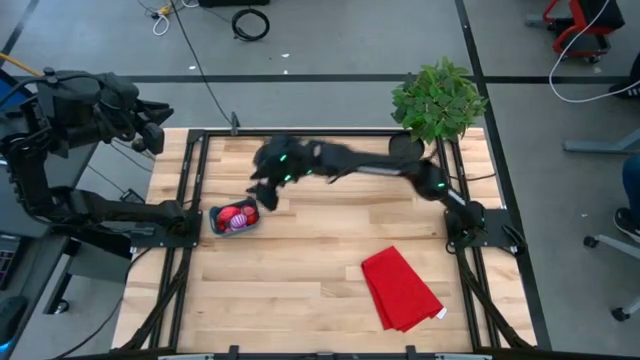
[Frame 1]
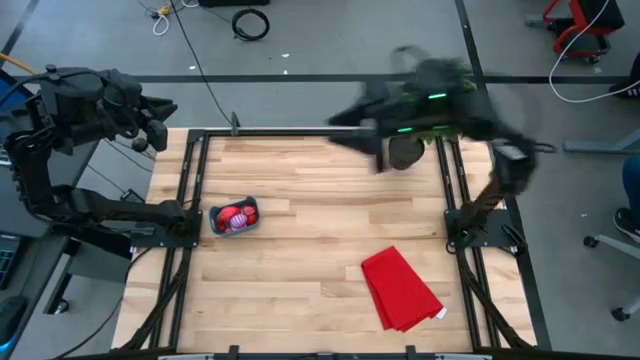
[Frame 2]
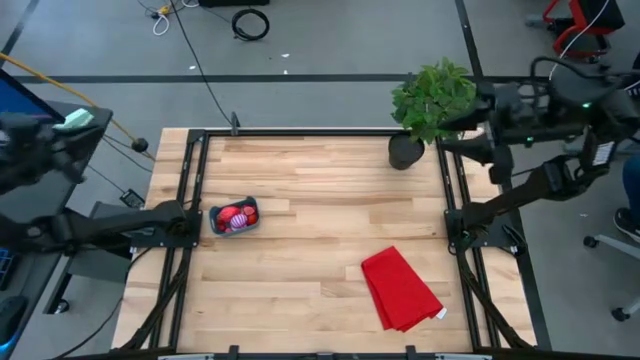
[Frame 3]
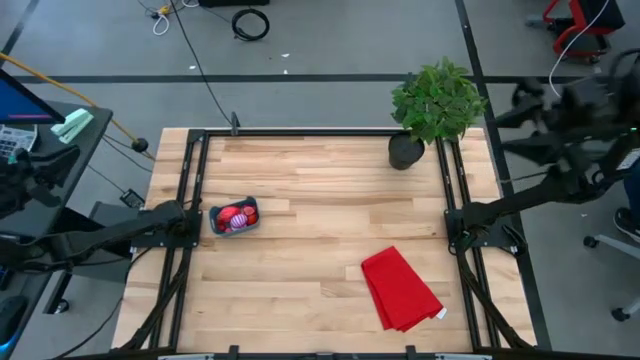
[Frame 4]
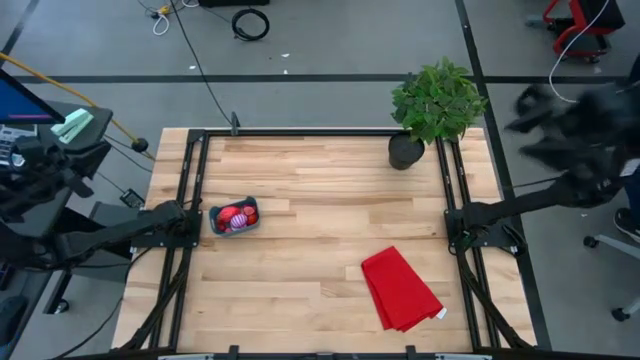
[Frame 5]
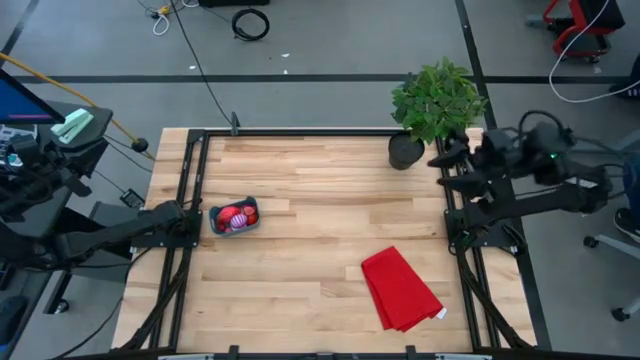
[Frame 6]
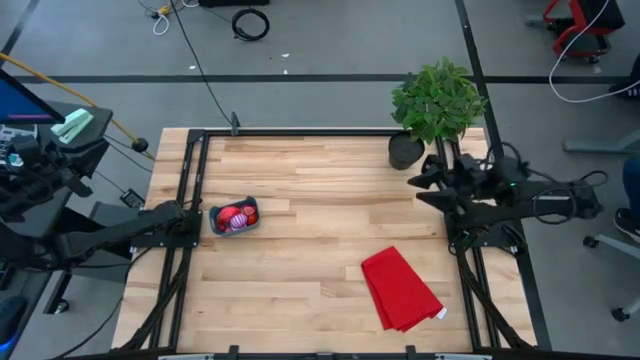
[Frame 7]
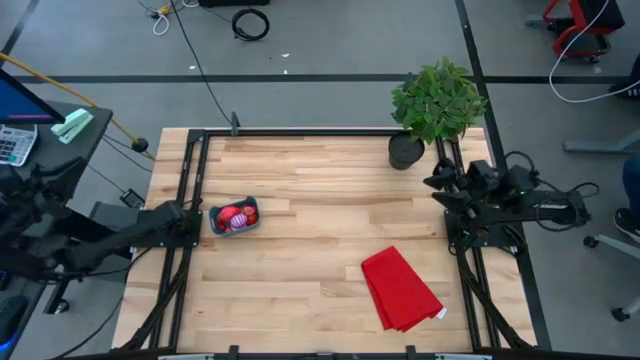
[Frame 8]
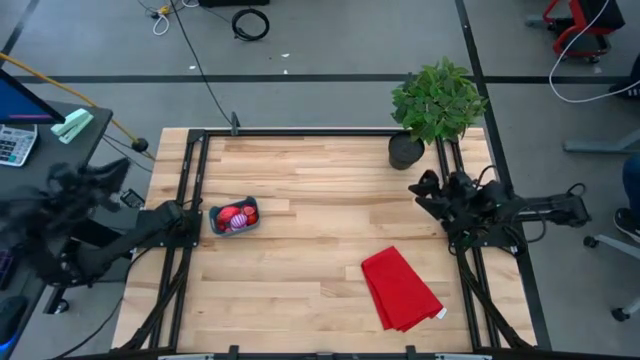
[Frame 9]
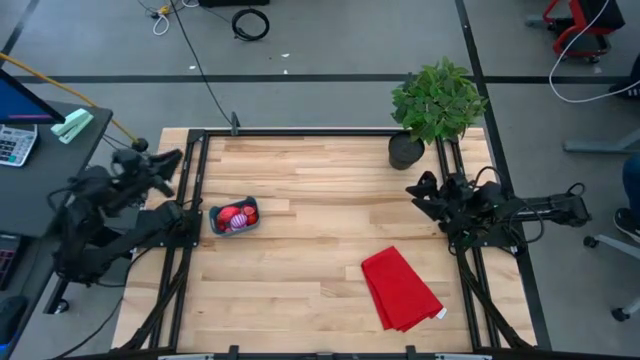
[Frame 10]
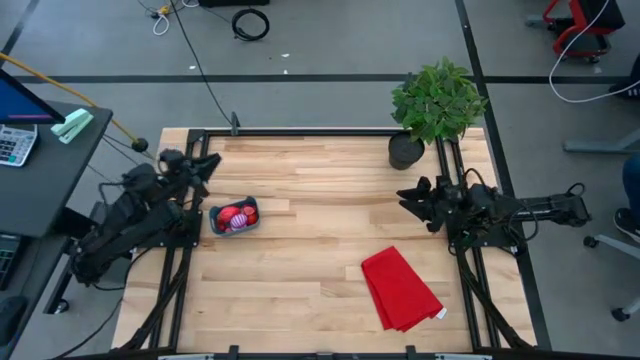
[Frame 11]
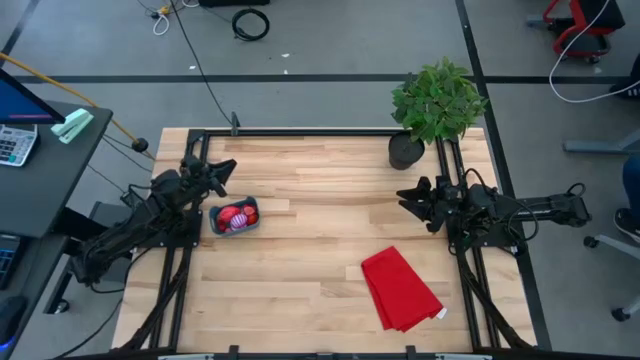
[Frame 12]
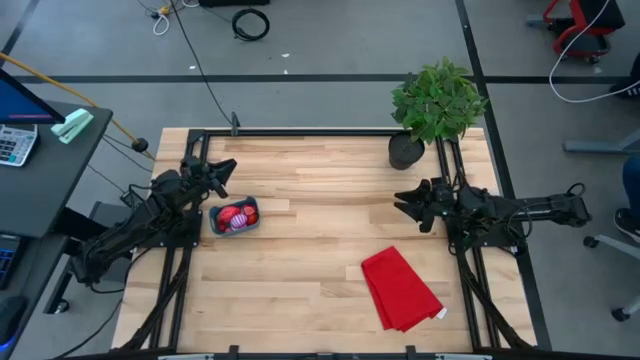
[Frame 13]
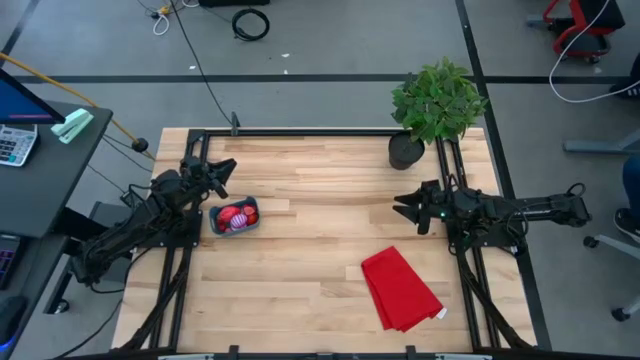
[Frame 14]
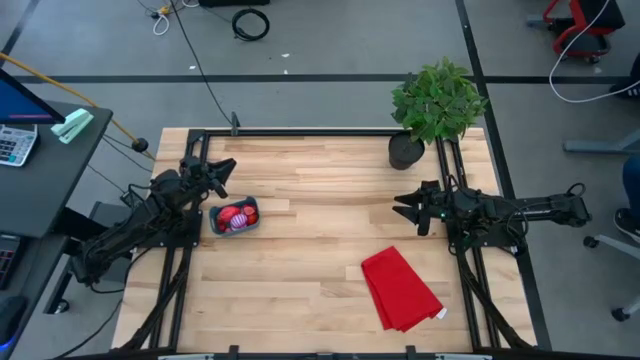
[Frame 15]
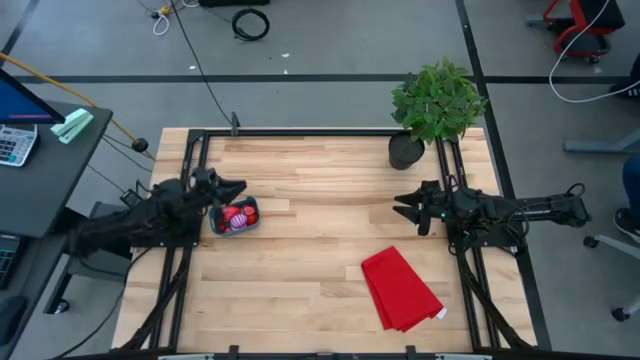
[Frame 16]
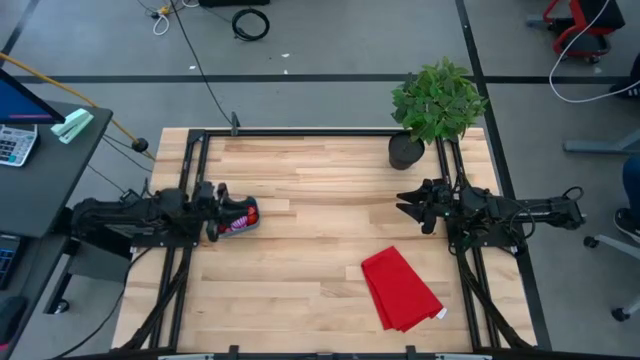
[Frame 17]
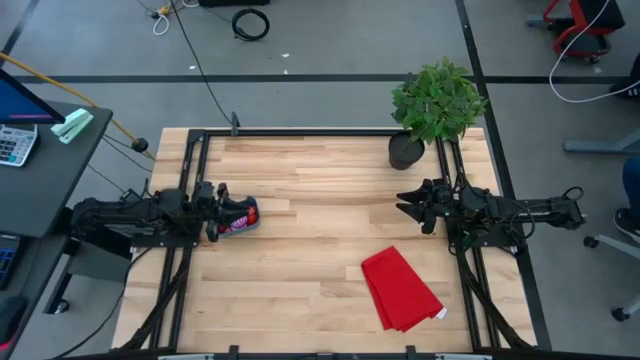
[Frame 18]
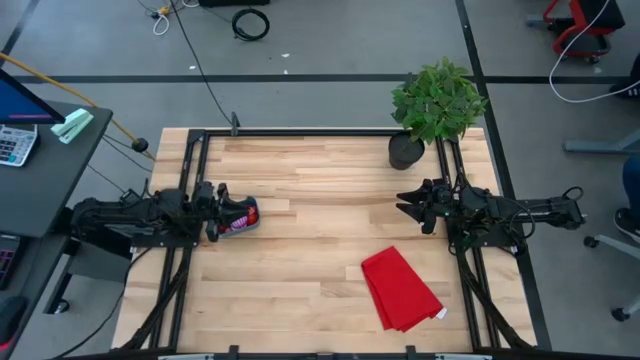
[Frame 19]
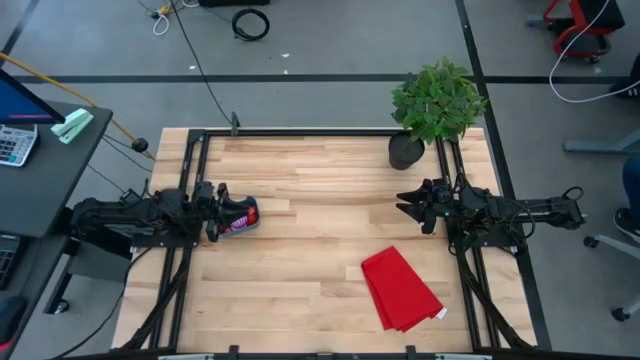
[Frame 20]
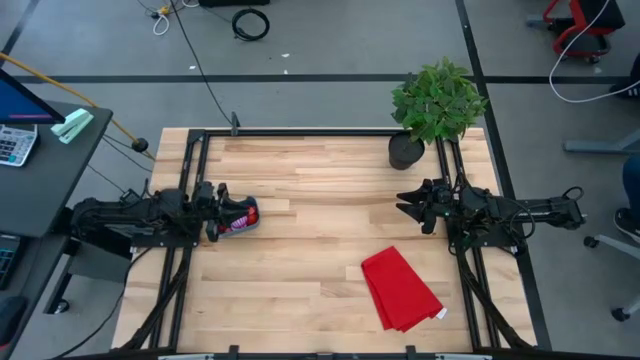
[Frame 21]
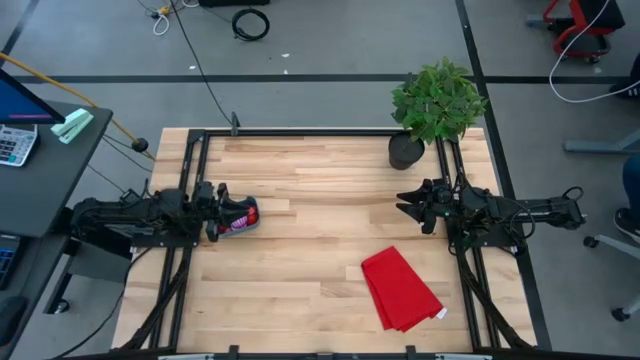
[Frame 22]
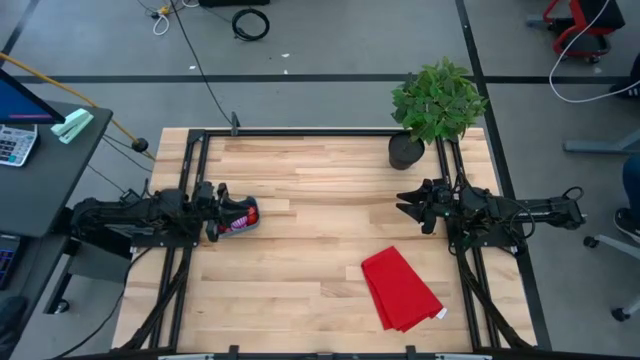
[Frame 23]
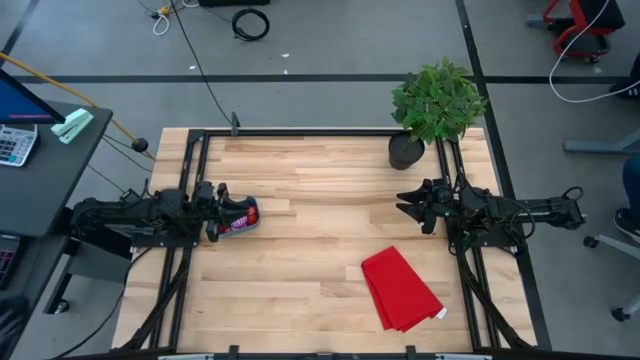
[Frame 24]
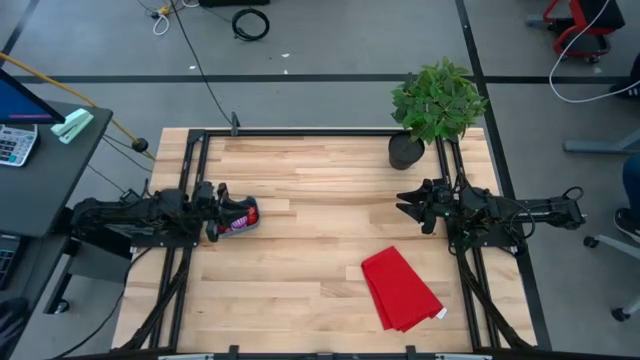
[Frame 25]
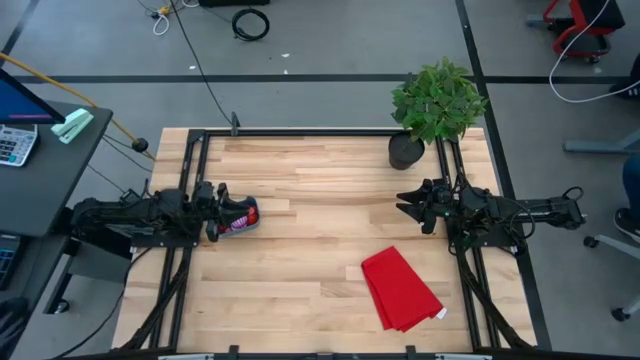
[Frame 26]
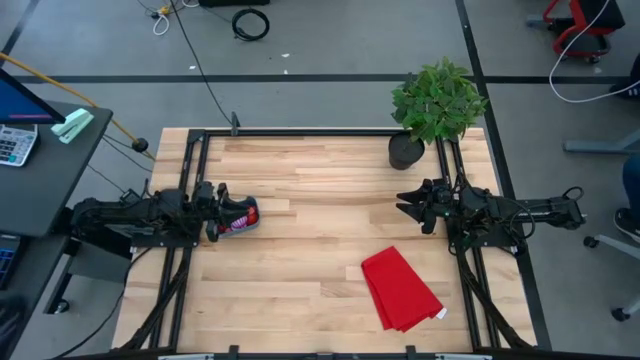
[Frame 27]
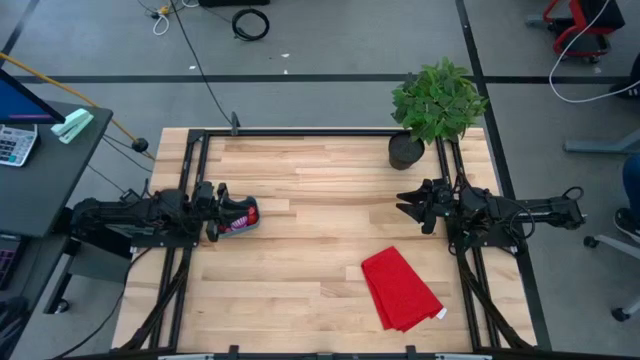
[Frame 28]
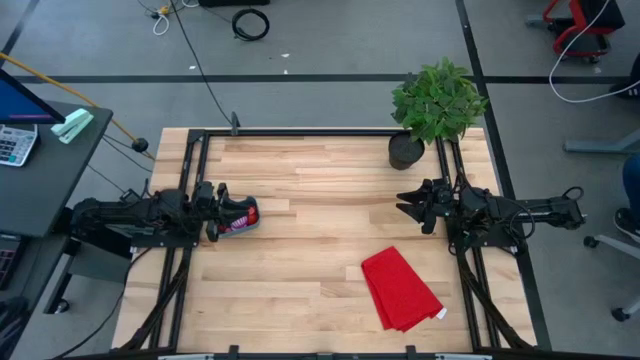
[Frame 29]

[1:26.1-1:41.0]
Task: Pick and placing Produce into tupperware
Return to Home Position

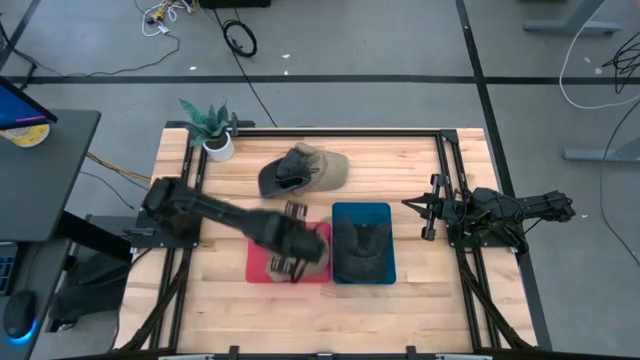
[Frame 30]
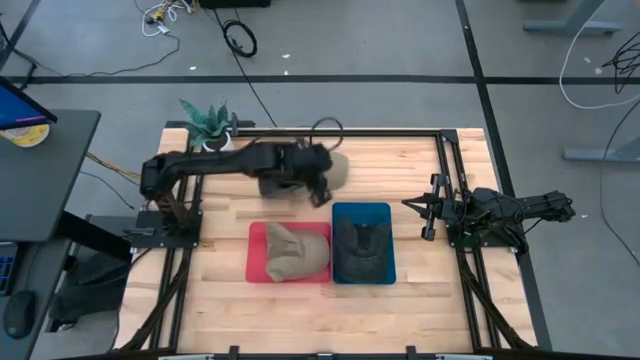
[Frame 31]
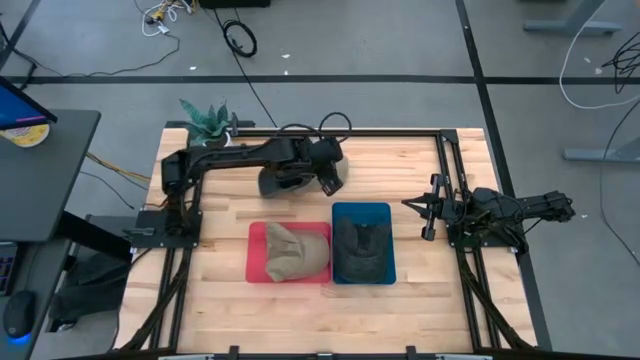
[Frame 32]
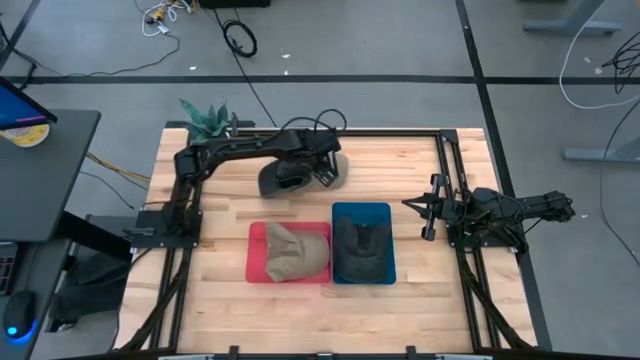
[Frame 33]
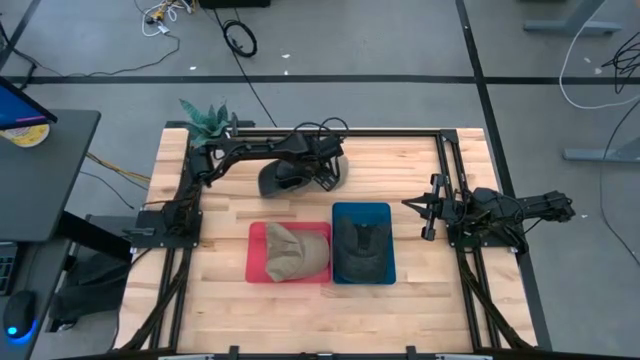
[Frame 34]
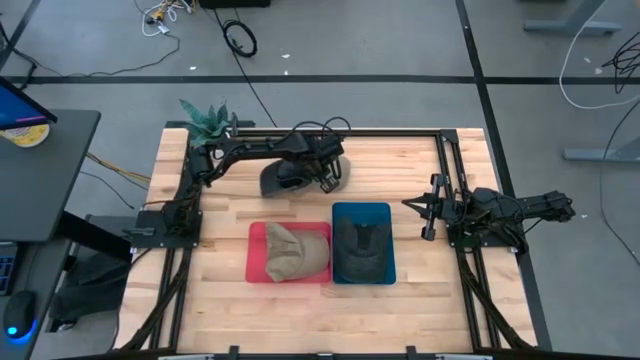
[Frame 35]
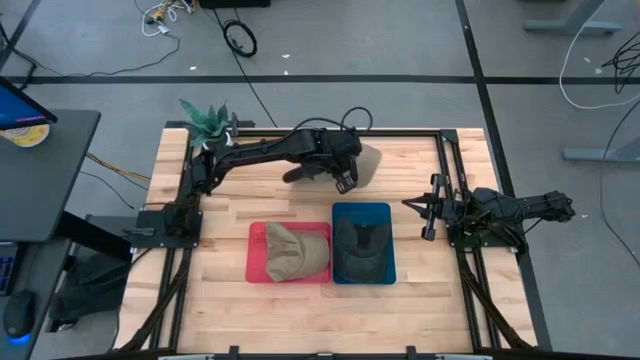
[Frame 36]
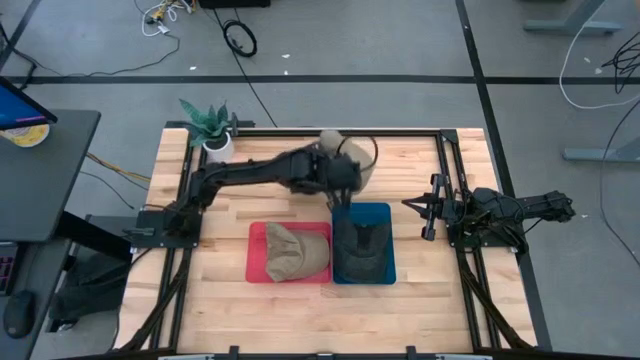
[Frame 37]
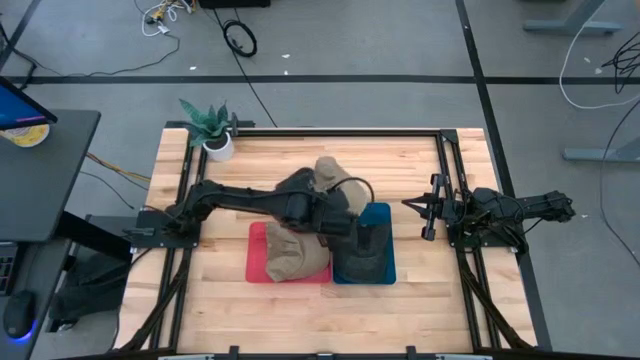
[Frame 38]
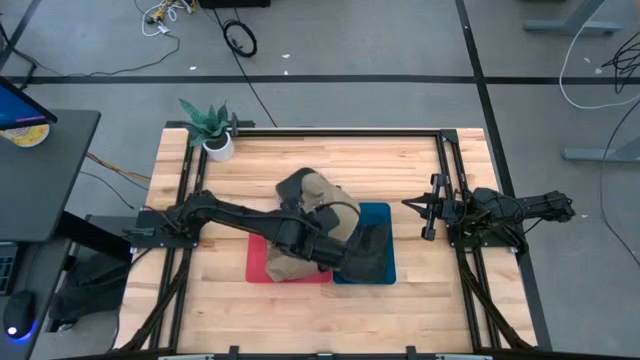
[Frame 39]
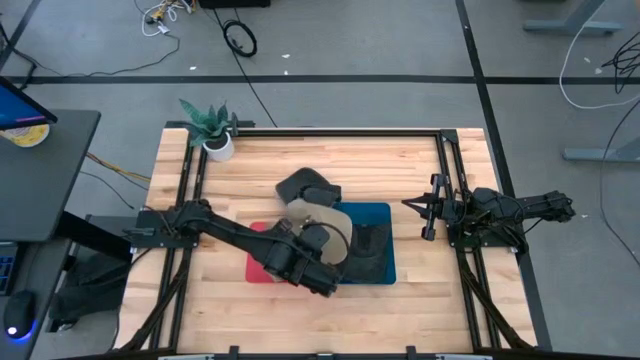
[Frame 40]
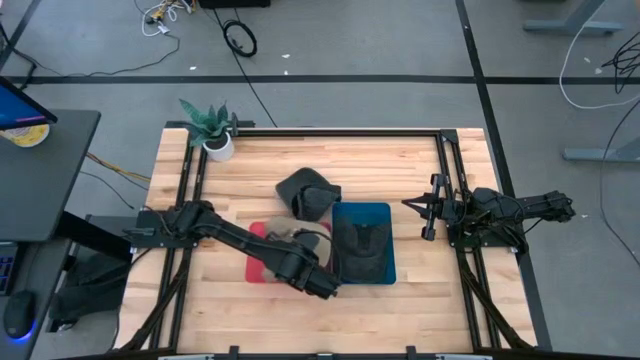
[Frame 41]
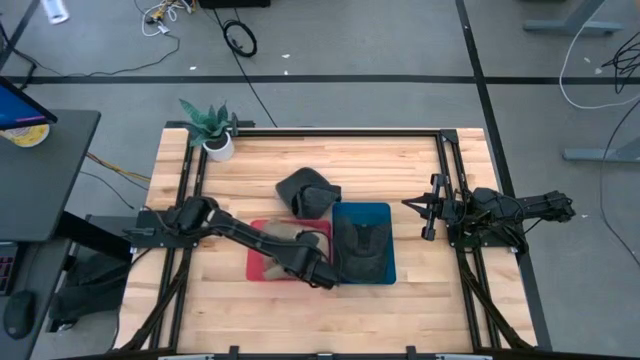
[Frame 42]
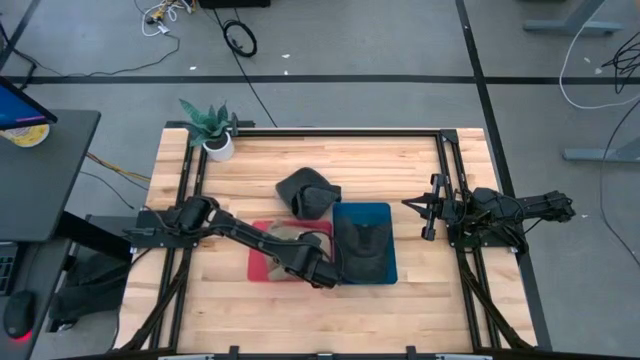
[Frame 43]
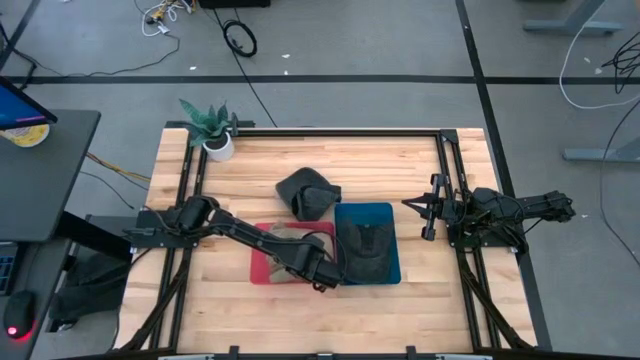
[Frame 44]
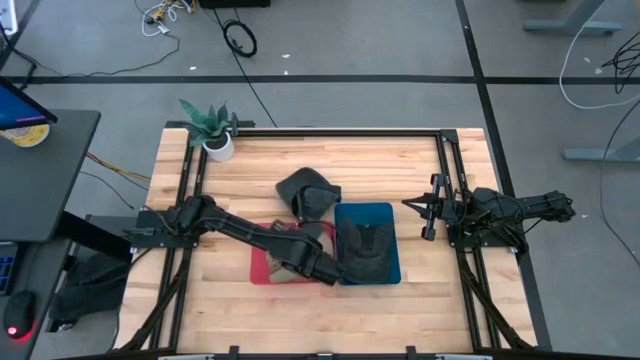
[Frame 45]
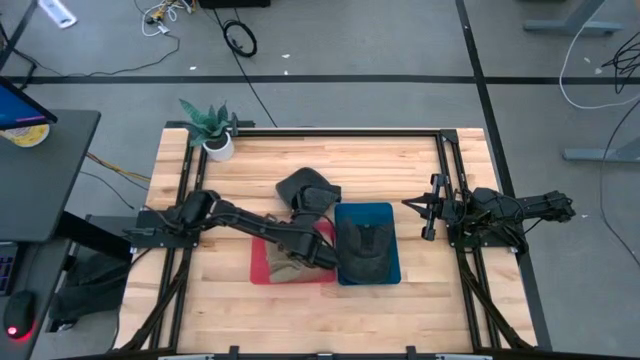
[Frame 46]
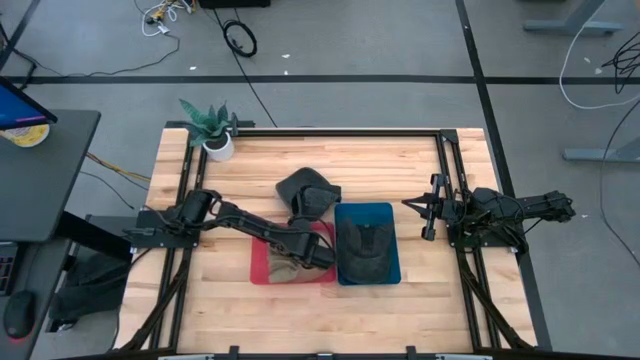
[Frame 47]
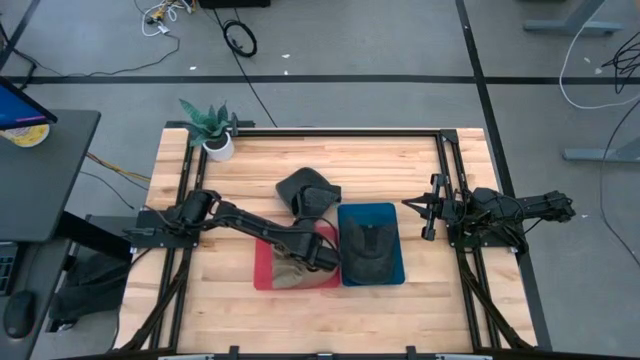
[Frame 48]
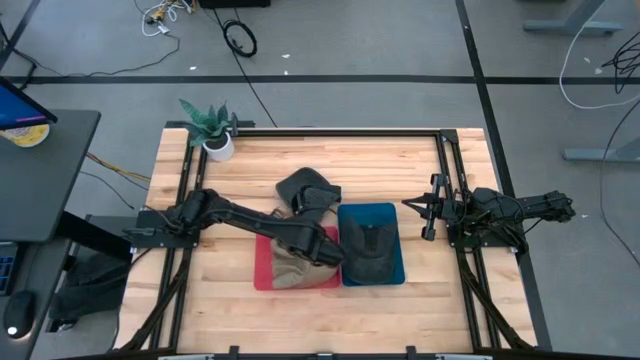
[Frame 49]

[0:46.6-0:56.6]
Task: Pick & Place hat
Put the brown cap into the red bin
